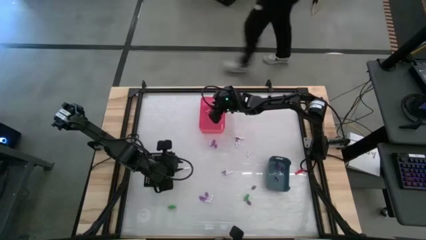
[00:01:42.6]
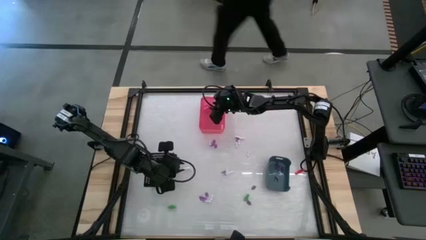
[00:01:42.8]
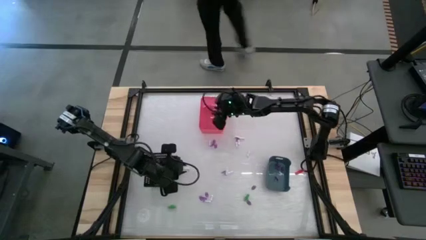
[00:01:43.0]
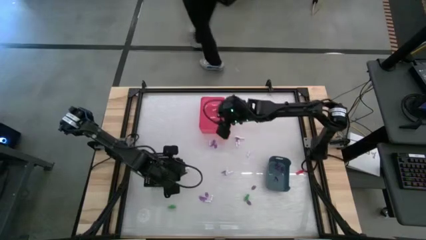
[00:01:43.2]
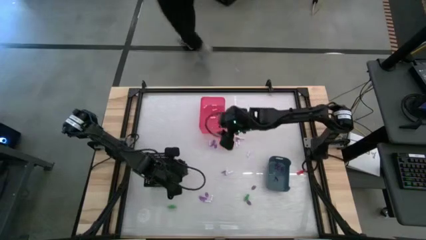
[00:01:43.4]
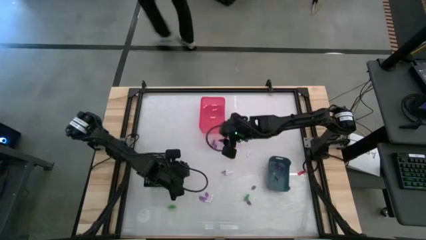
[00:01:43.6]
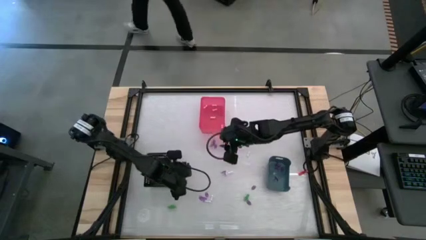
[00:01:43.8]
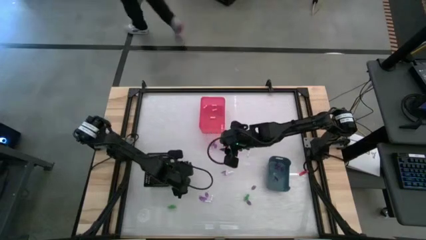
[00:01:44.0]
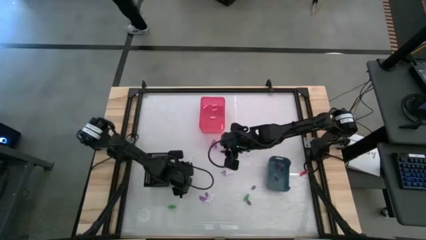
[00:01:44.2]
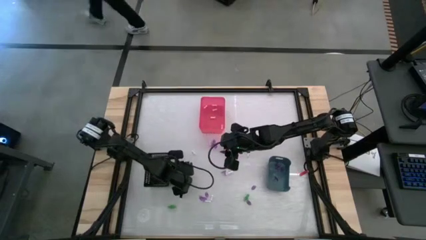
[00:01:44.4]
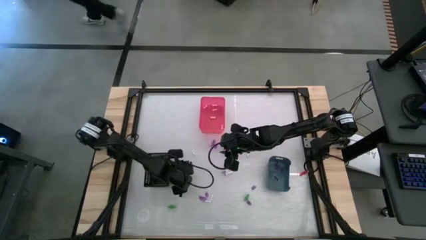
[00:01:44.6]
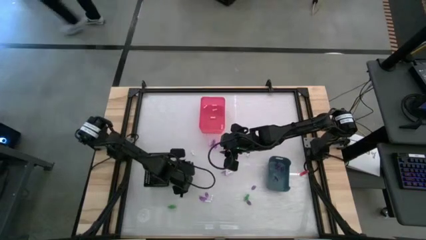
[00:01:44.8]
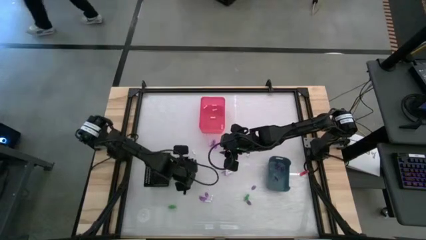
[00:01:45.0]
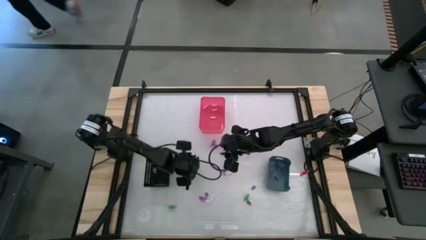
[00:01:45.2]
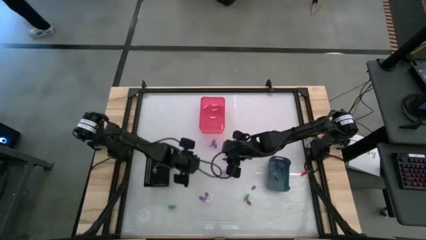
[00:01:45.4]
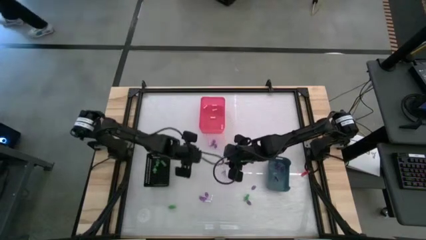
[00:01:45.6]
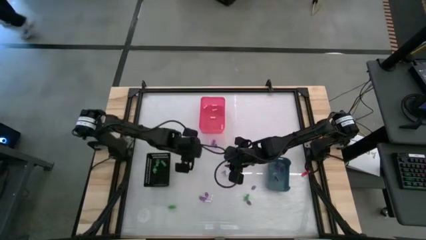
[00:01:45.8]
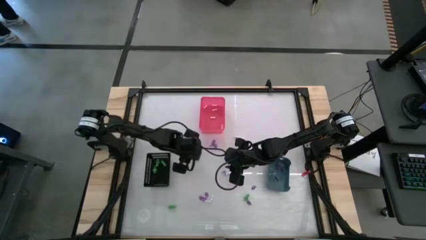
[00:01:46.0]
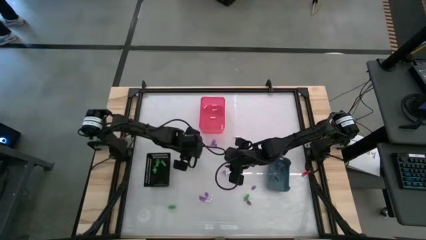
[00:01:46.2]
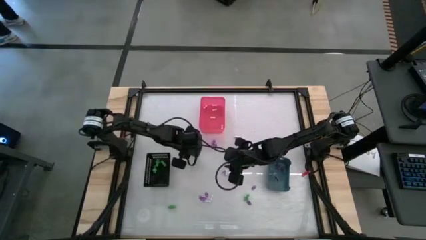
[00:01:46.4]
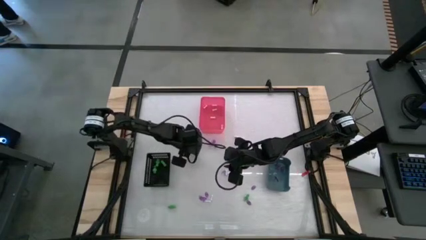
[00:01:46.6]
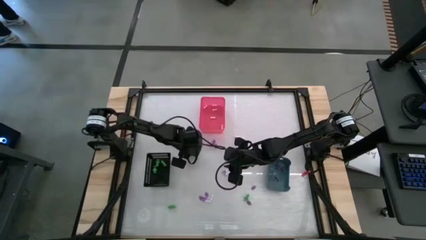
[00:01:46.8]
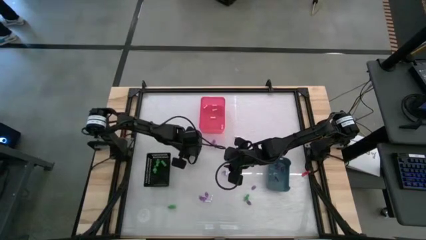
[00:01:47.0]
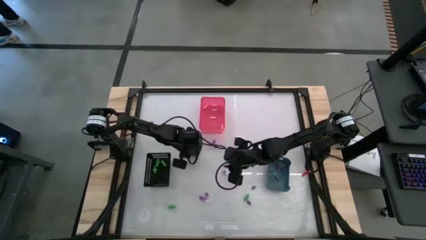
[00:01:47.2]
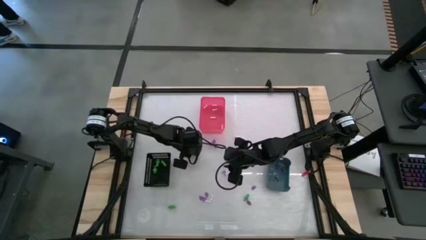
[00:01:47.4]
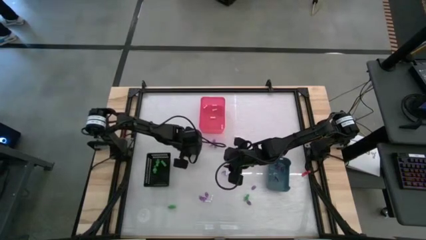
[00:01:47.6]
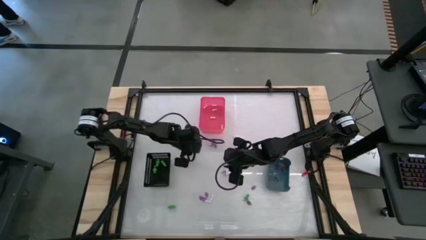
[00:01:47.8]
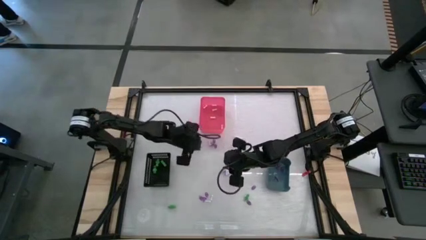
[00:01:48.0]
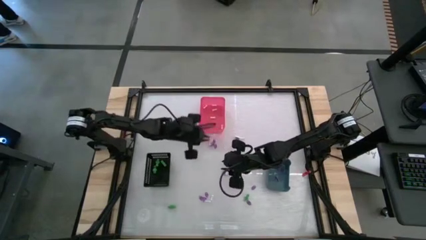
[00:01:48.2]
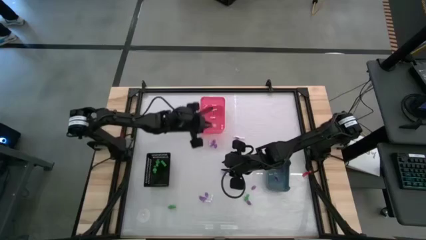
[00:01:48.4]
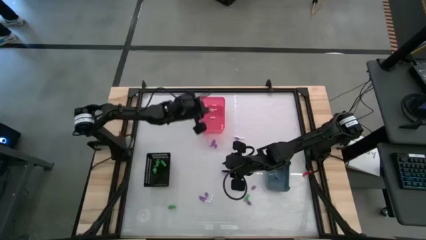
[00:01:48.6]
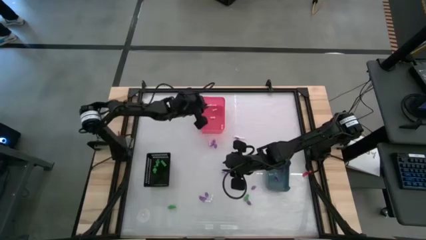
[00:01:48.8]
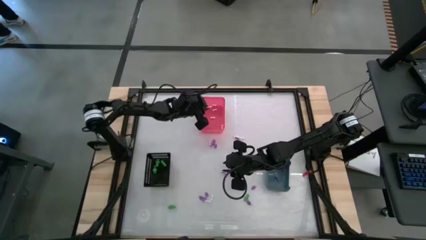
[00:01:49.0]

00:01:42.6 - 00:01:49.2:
Task: Sort Halloween decoration
Put the bone toy into the red bin

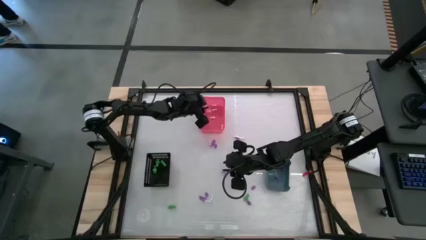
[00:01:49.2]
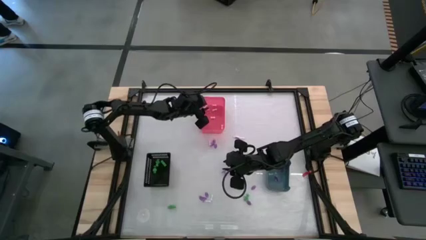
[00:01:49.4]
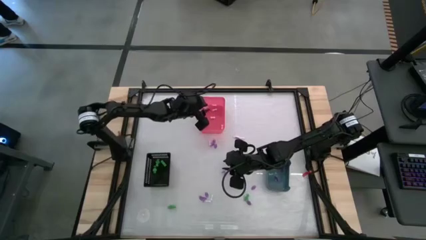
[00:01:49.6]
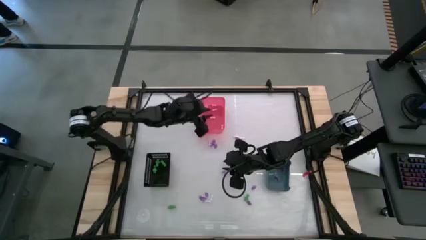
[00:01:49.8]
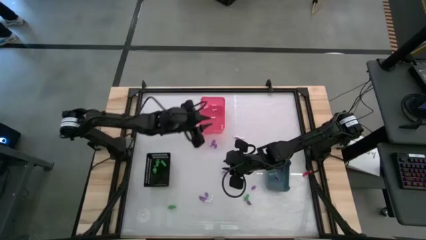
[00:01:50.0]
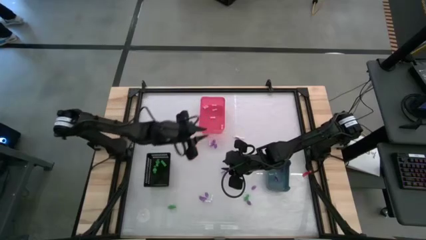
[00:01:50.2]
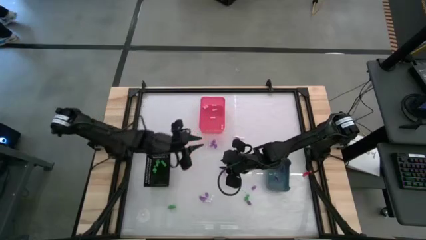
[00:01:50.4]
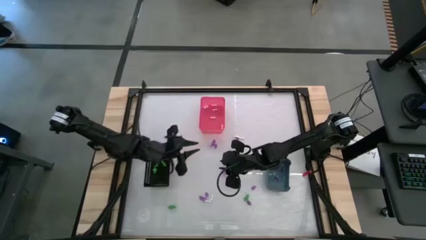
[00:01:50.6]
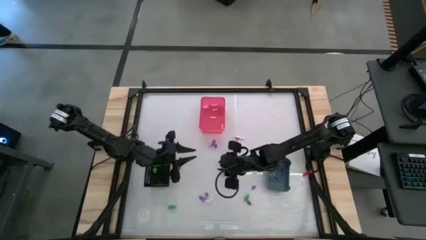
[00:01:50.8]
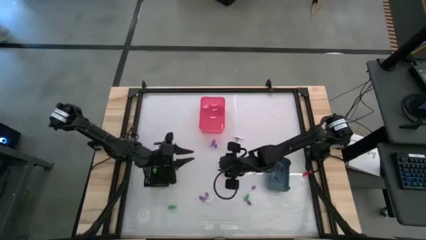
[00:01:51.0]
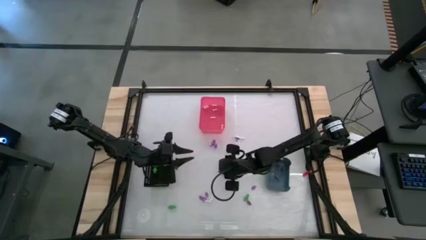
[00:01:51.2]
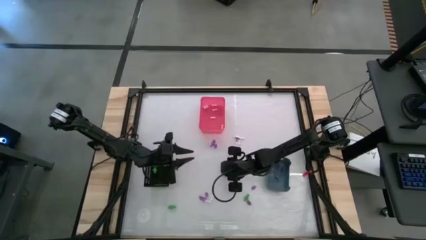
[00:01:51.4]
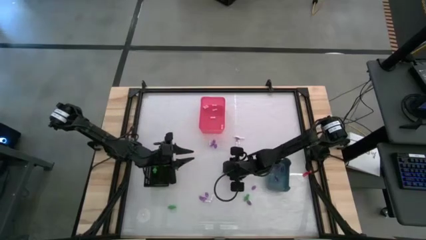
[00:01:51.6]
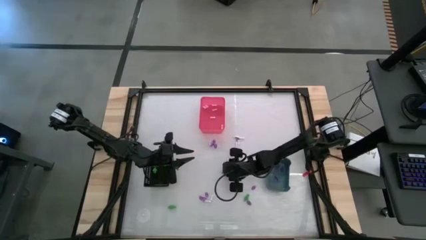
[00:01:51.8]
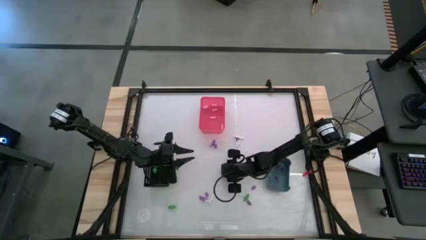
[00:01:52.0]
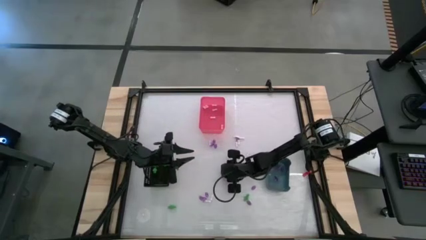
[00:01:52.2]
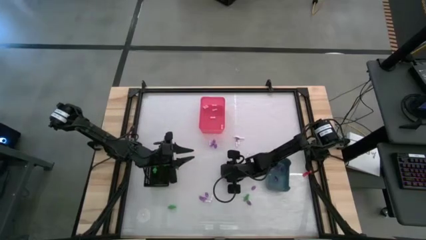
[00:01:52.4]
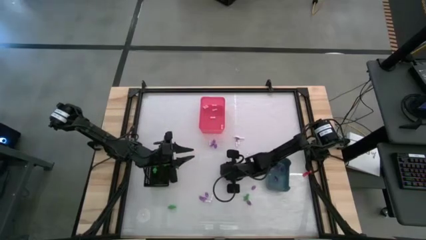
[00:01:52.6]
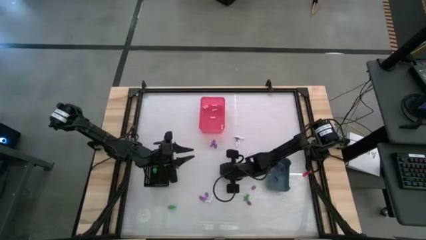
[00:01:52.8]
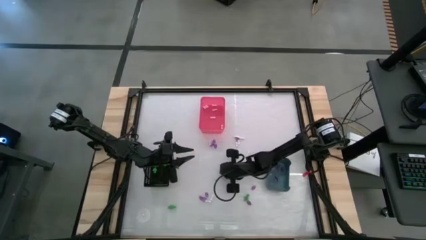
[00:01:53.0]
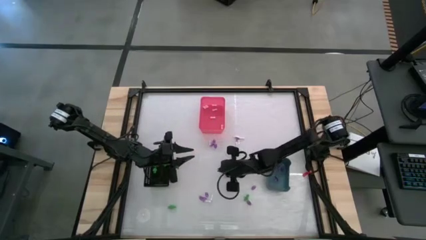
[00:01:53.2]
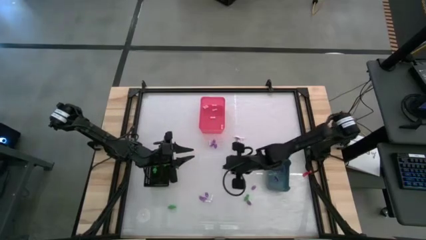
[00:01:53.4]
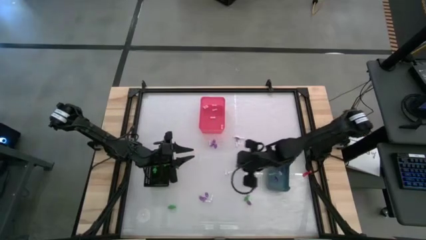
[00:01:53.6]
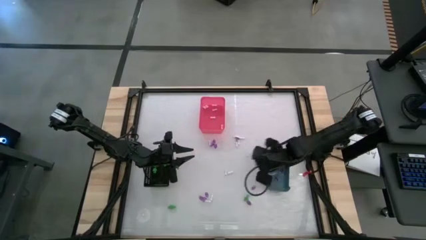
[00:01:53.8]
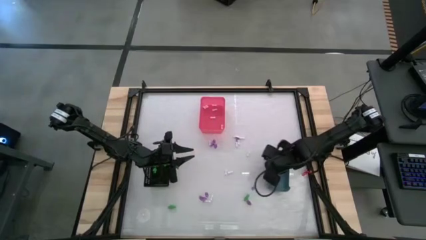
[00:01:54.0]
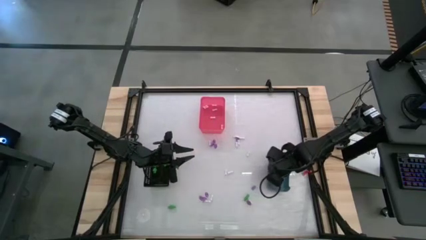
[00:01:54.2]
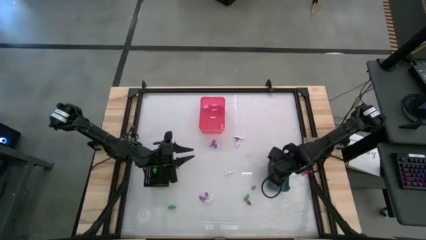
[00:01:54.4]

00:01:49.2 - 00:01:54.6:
Put the witch hat toy into the blue bin

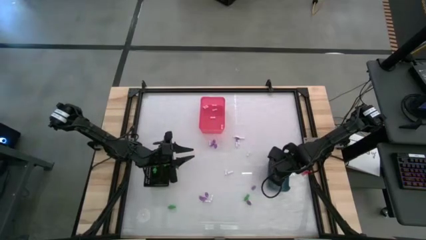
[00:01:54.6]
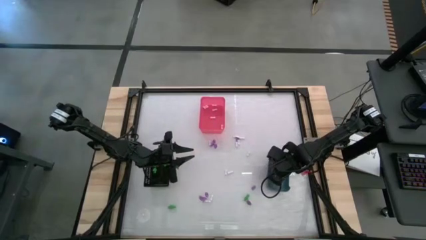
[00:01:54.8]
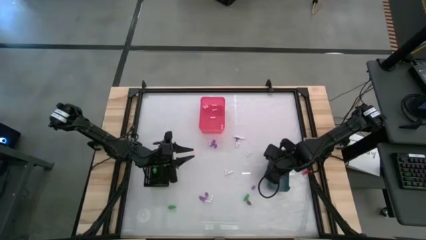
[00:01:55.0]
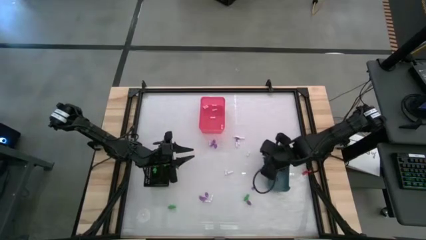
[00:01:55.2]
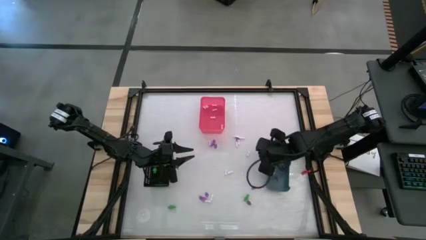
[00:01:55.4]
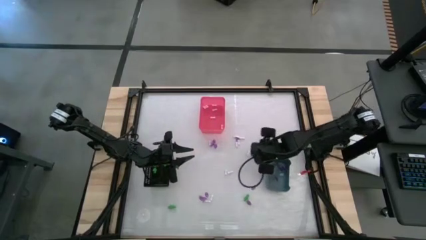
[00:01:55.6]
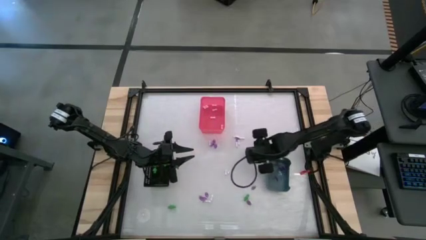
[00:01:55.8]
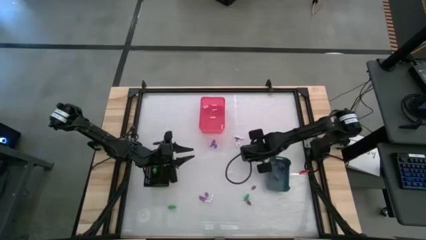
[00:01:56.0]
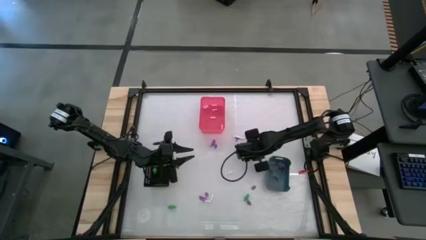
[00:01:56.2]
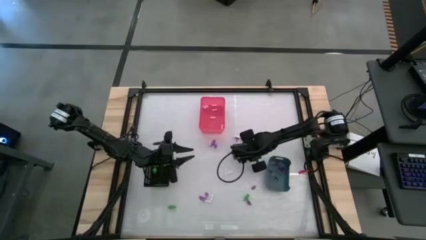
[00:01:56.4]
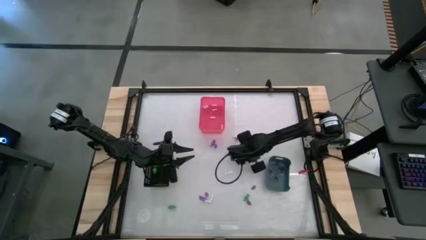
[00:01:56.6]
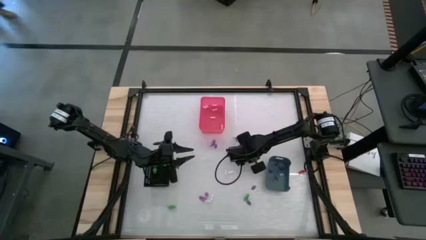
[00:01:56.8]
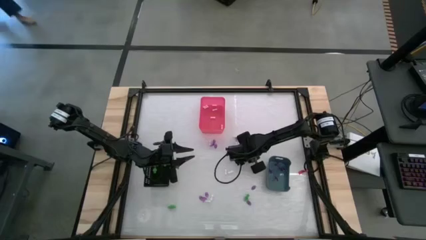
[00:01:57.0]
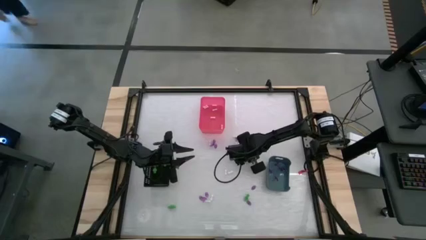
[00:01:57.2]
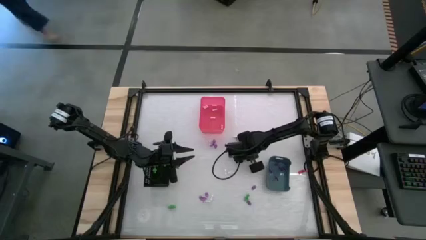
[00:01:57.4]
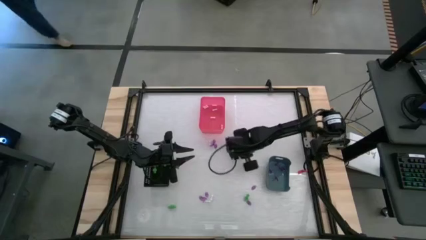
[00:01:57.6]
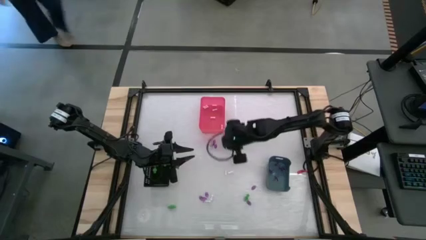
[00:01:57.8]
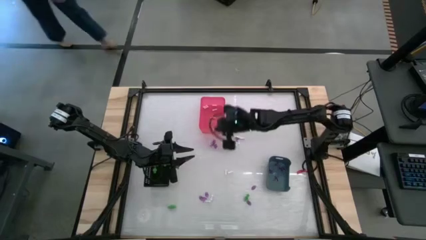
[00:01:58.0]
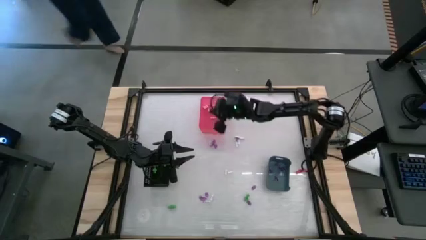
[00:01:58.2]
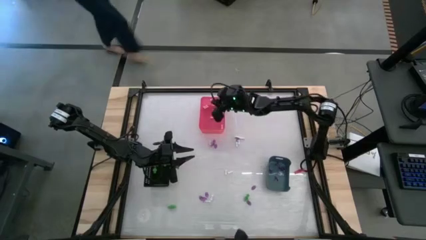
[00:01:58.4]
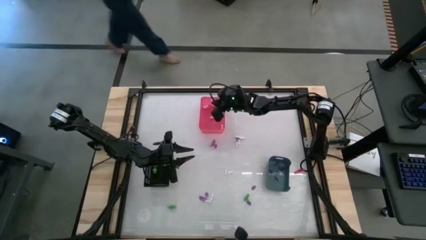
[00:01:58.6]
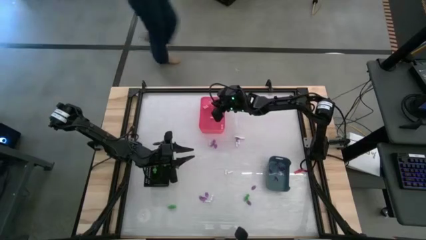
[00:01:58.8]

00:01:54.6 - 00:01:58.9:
Put the bone toy into the red bin
